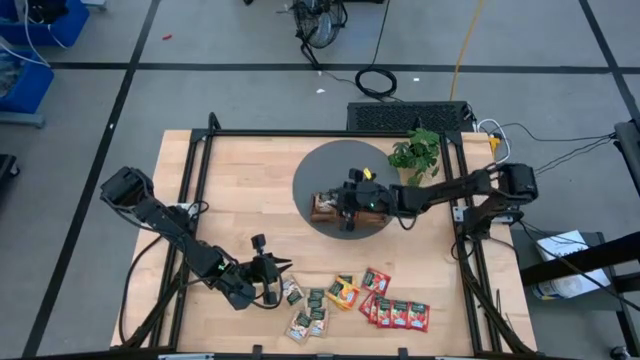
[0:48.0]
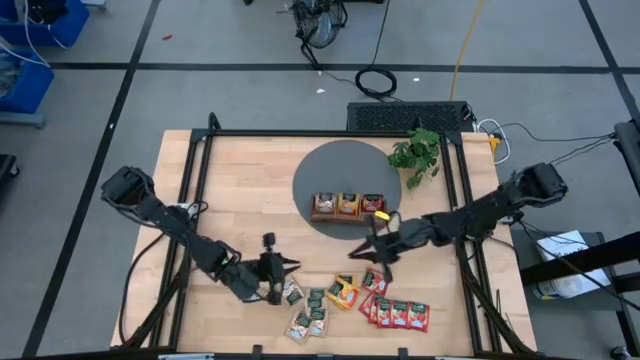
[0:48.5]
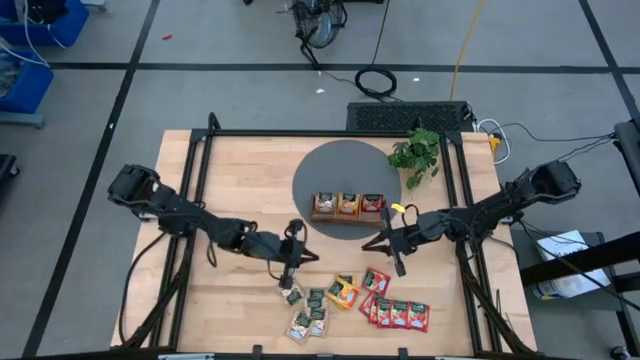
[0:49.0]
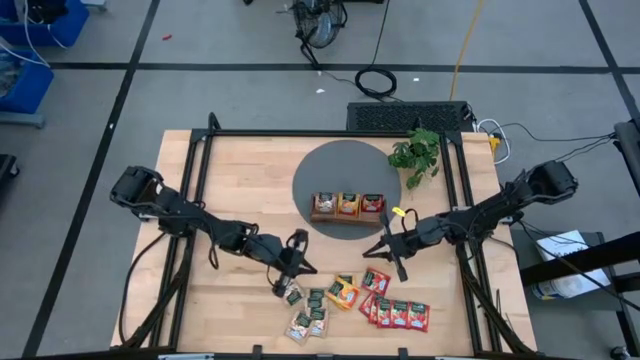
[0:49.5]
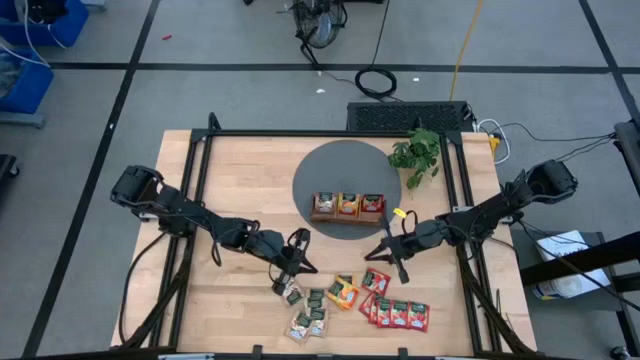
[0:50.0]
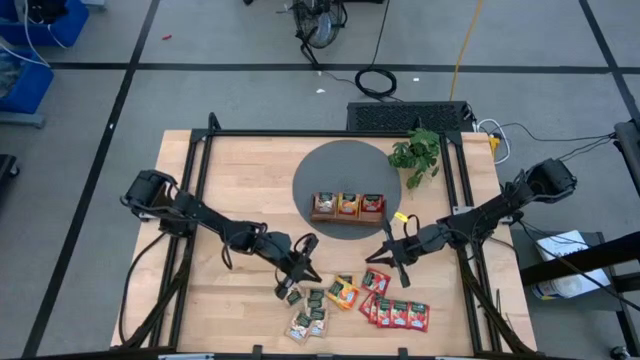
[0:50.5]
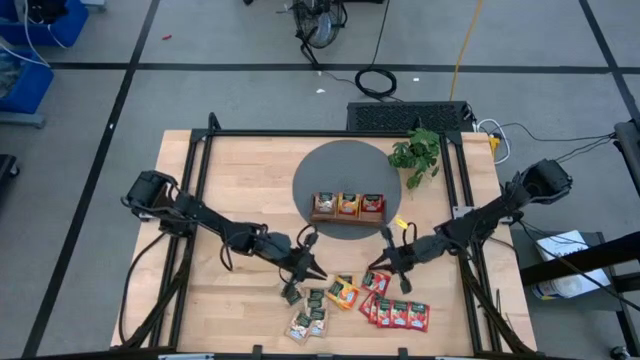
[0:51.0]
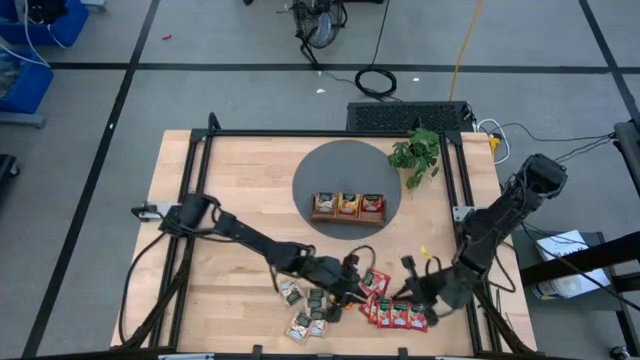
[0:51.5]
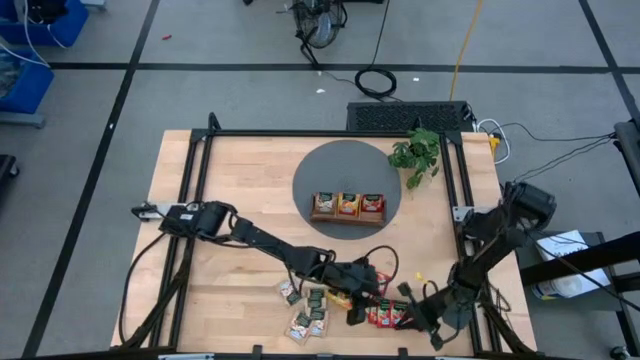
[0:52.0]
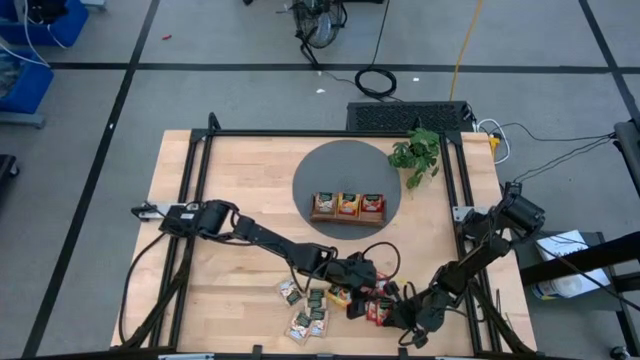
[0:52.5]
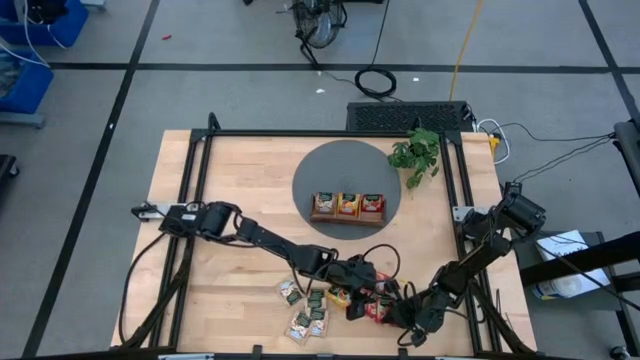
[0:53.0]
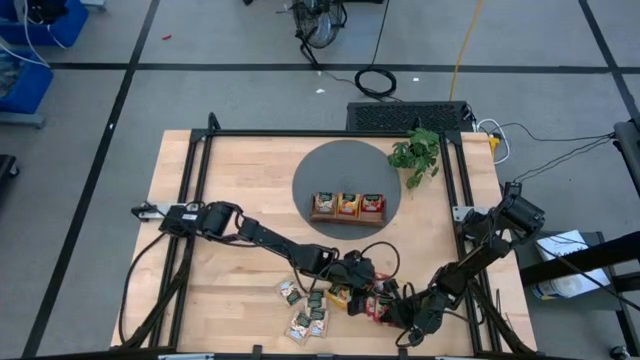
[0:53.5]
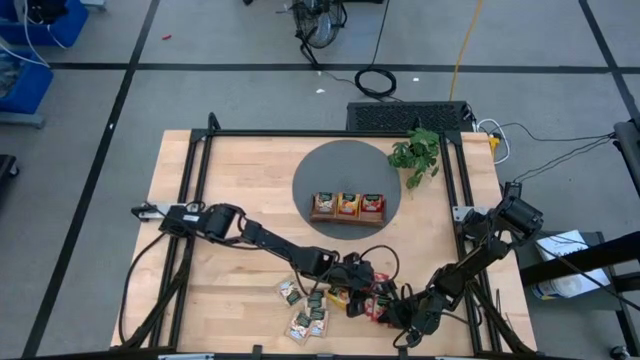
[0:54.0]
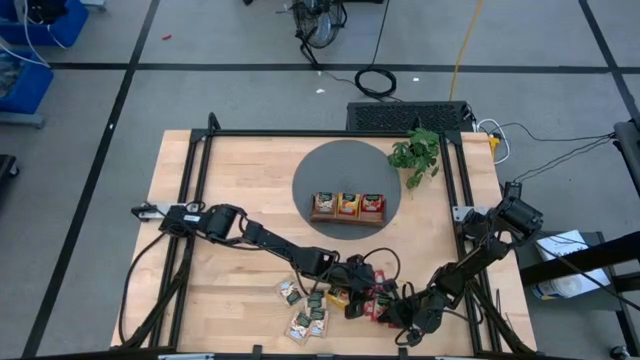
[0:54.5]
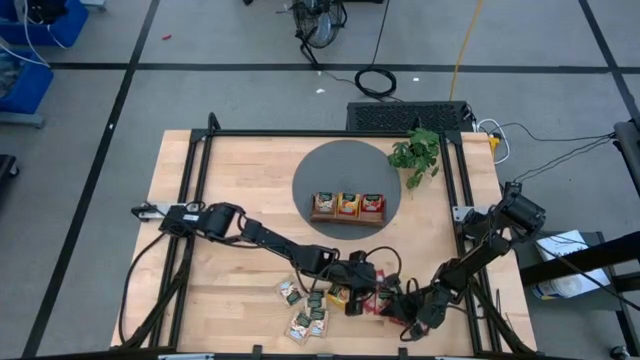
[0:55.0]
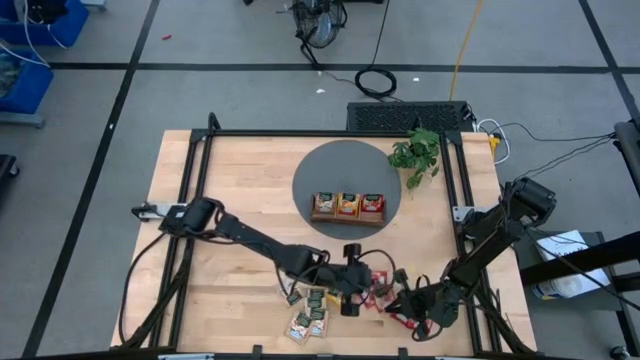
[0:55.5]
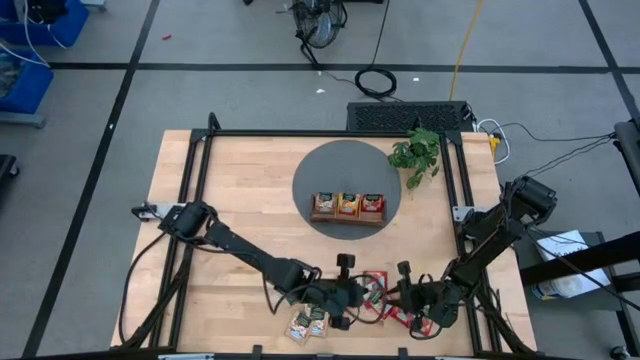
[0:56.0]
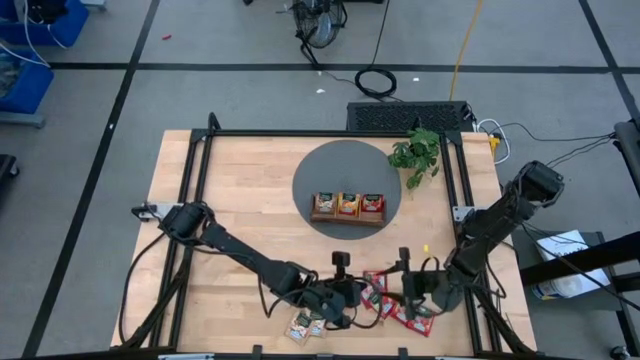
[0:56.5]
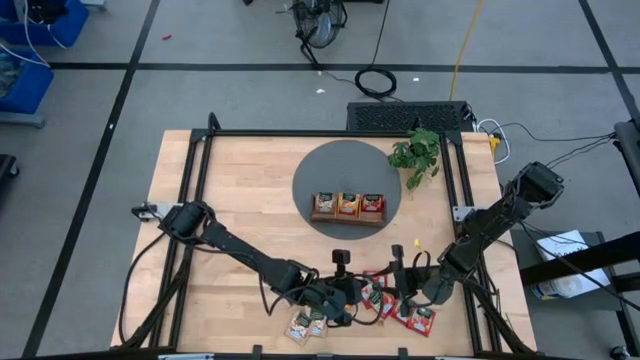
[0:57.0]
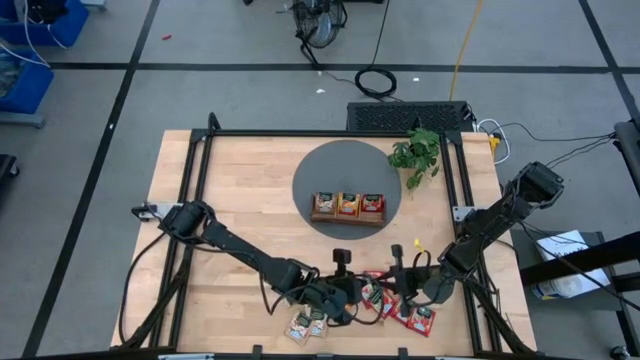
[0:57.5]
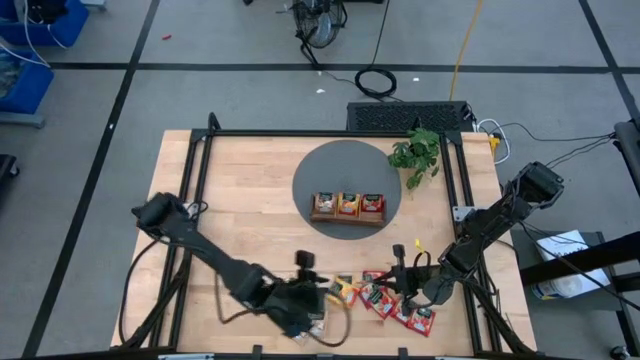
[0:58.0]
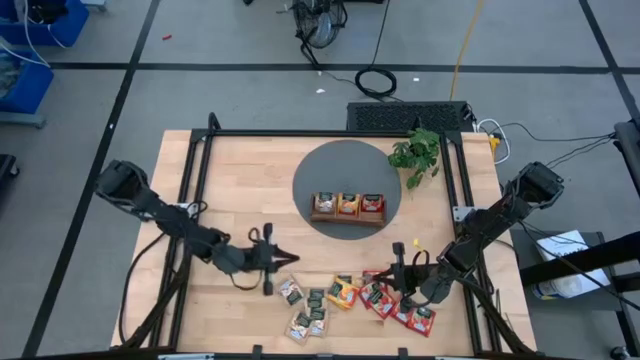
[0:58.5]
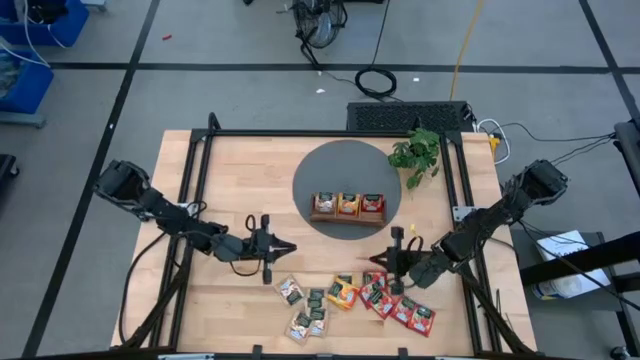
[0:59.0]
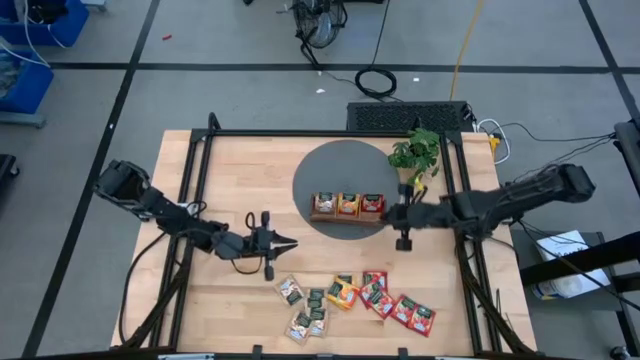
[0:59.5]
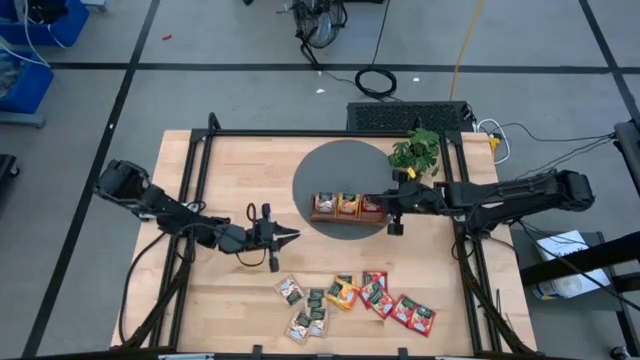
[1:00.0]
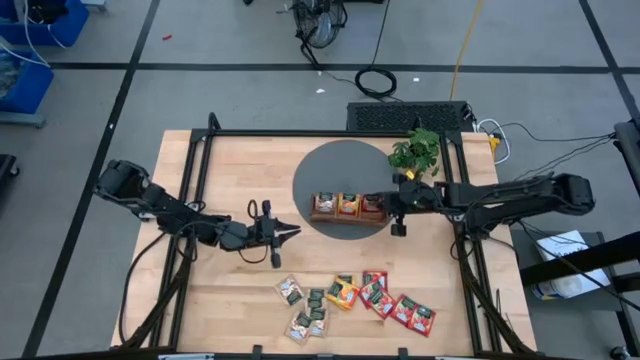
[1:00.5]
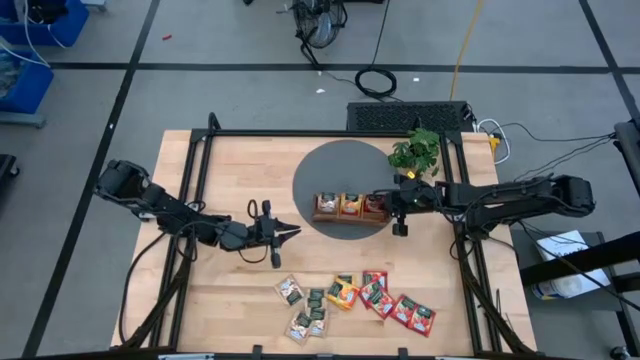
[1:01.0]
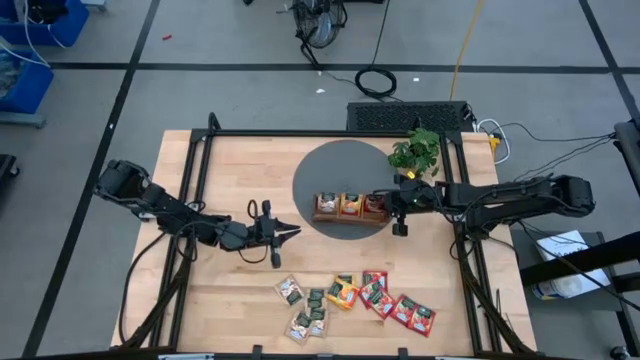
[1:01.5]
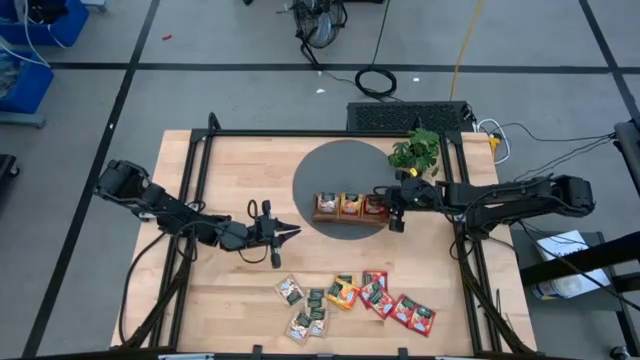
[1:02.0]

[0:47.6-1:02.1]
Task: Pick & Place Tea
Put the red tea bag into the right section of the wooden organiser

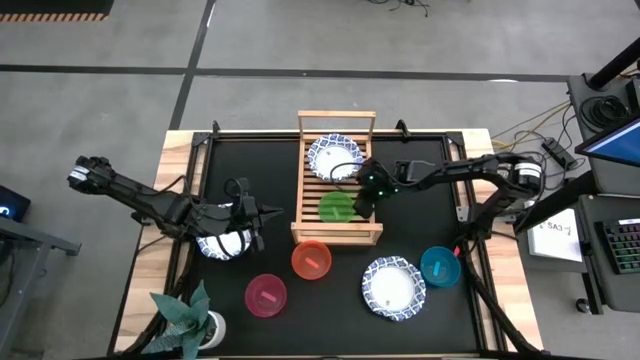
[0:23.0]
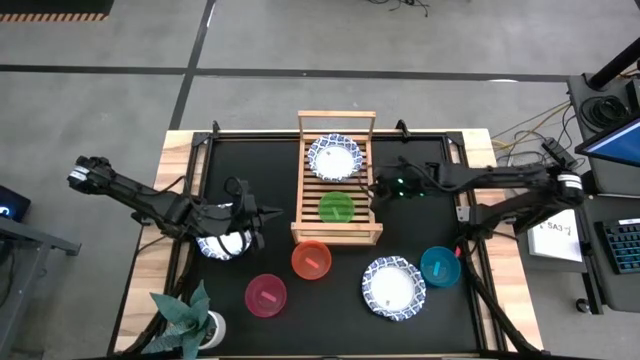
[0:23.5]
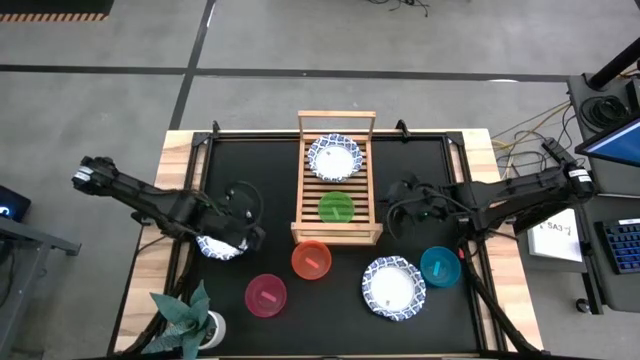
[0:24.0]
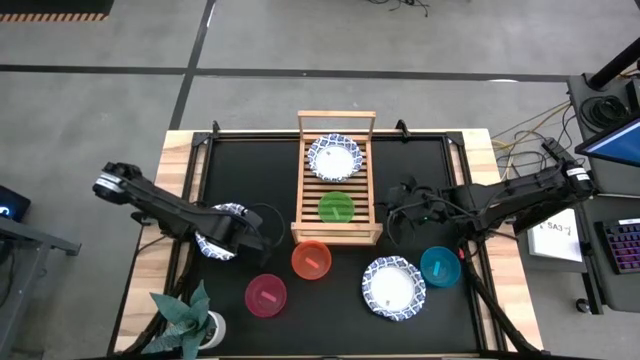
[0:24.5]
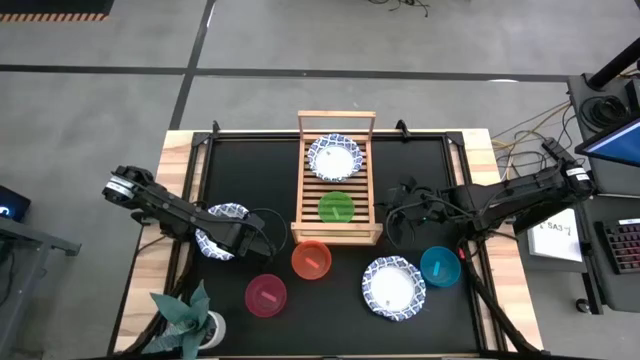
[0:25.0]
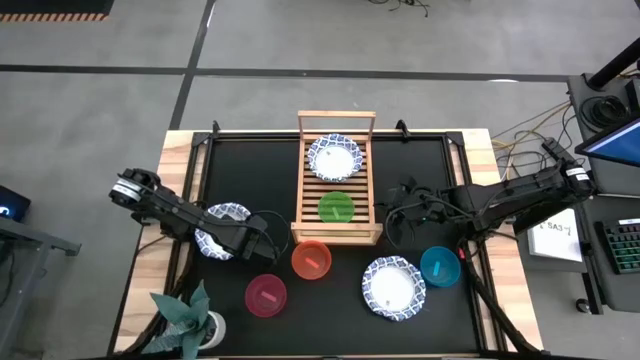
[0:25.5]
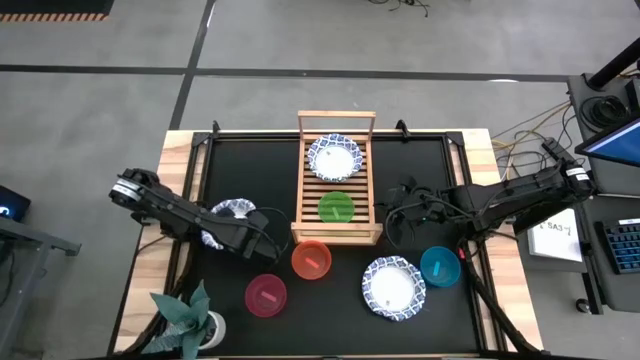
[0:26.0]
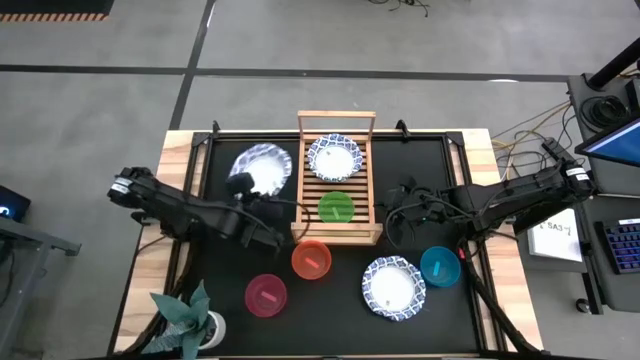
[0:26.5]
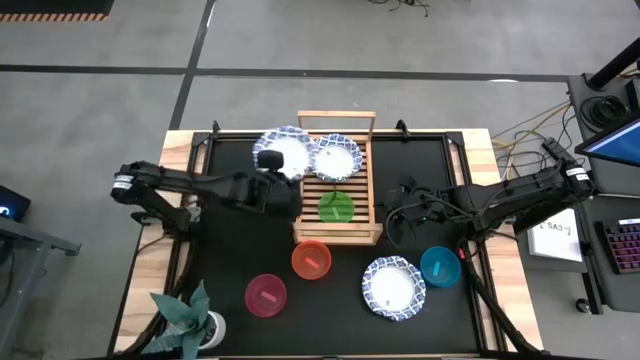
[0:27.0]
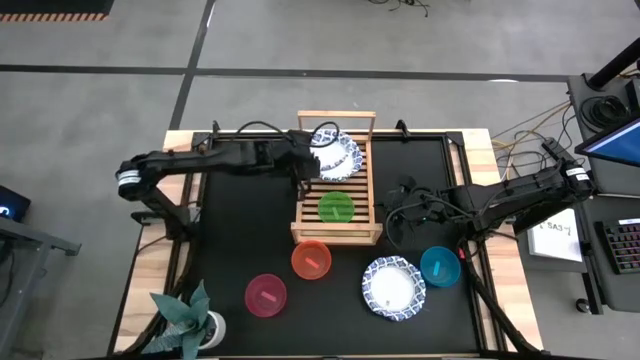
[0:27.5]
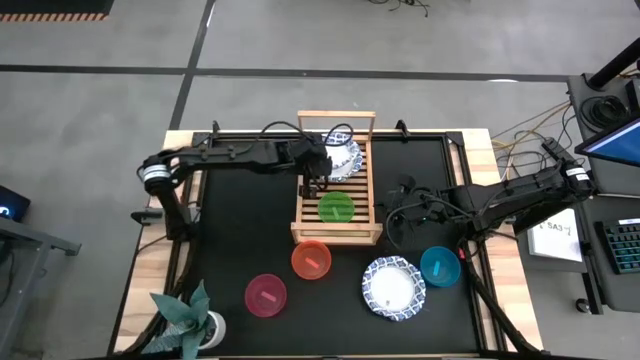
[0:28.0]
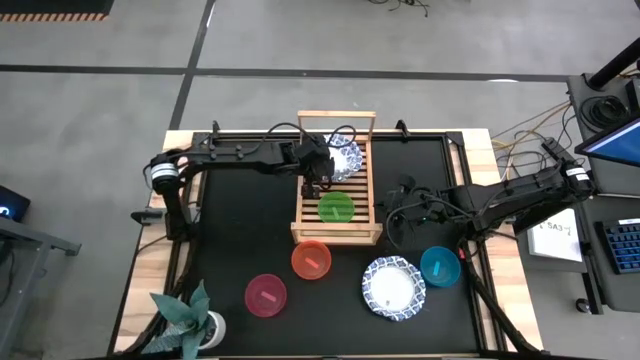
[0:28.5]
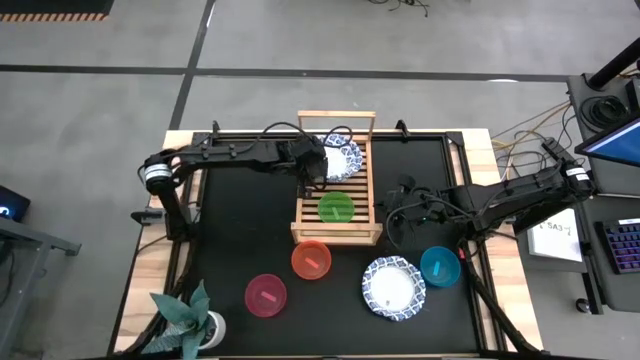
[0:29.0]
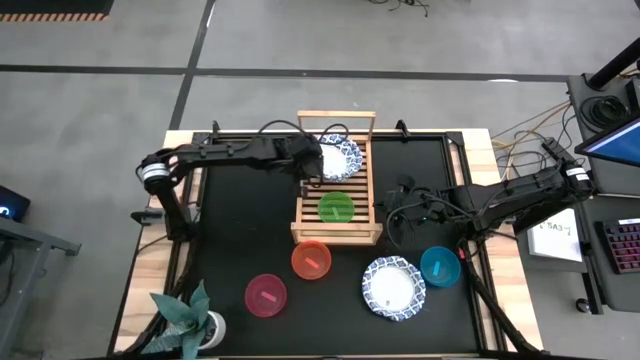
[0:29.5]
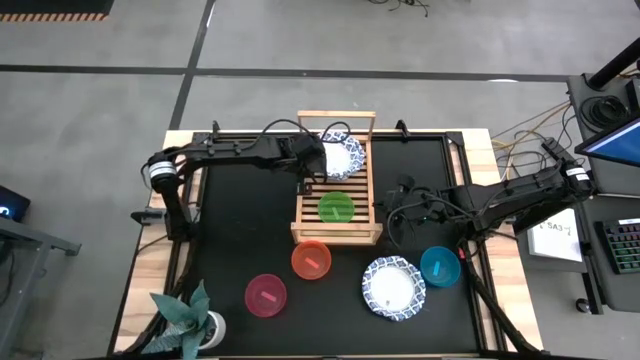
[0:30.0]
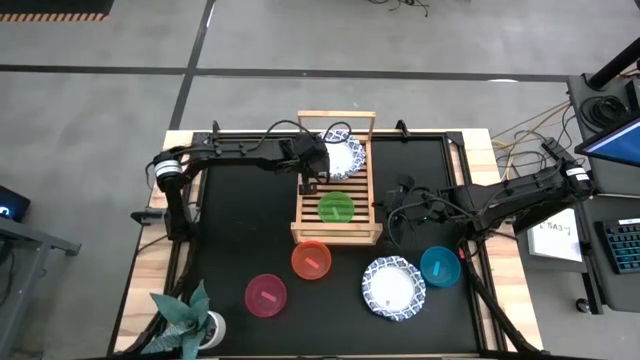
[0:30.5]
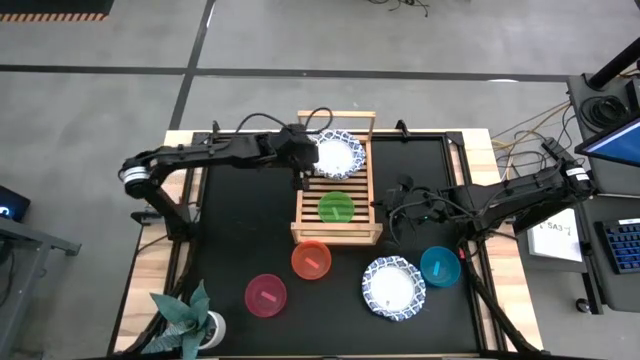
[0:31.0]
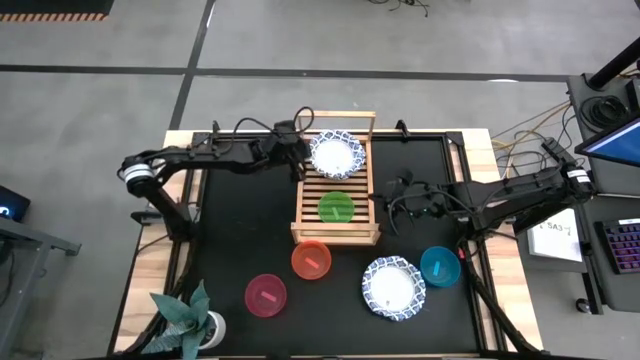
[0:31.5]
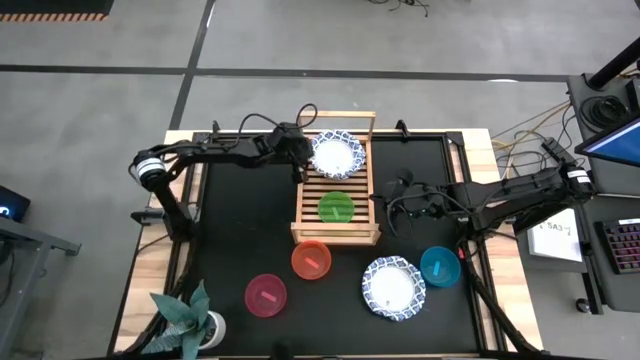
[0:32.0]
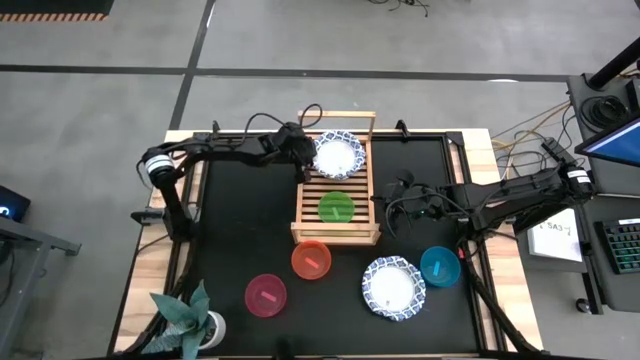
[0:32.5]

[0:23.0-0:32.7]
Task: Place and stack bowls onto a shelf
Stack the left white bowl on top of the white bowl on the shelf
